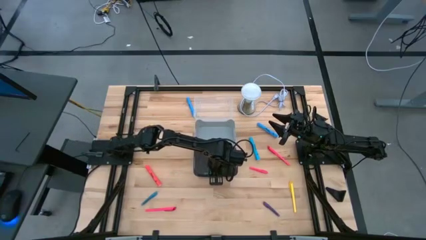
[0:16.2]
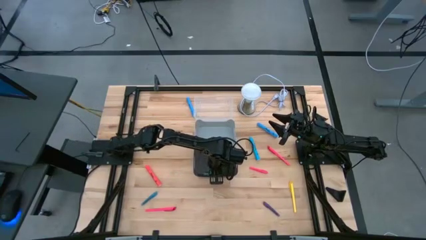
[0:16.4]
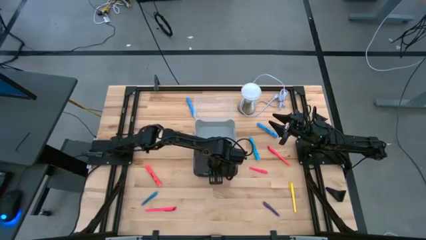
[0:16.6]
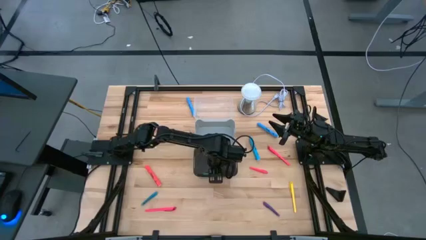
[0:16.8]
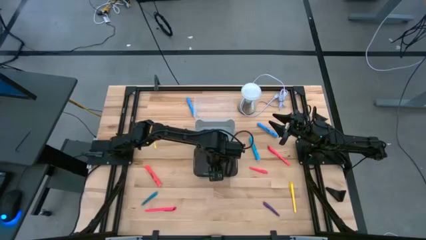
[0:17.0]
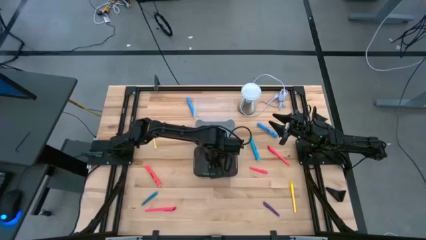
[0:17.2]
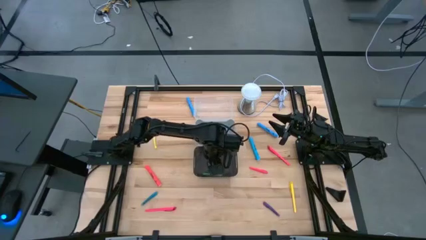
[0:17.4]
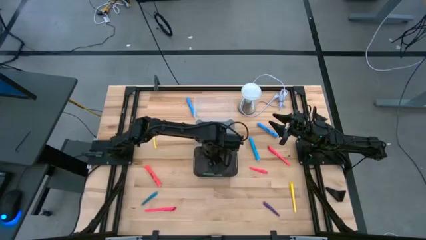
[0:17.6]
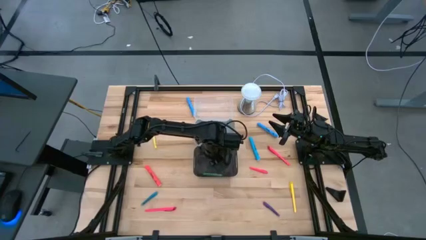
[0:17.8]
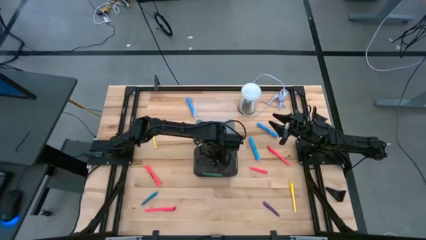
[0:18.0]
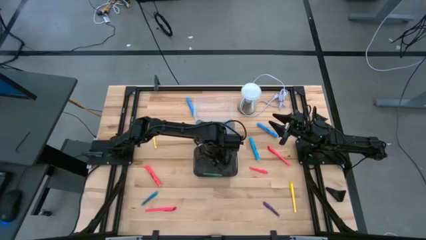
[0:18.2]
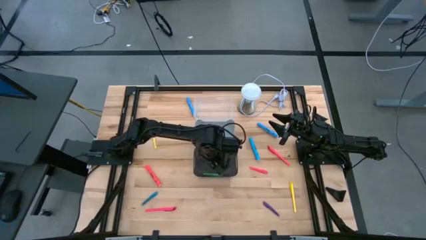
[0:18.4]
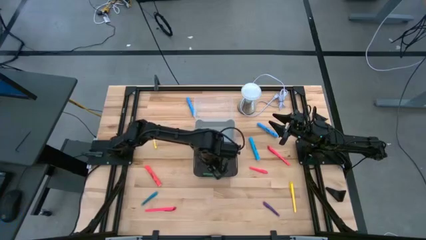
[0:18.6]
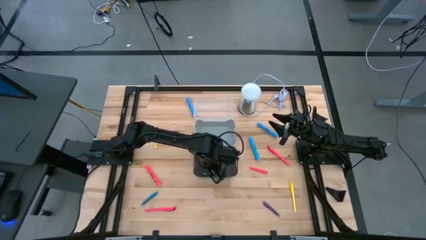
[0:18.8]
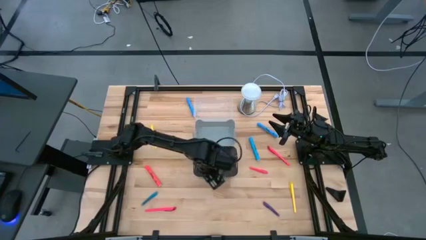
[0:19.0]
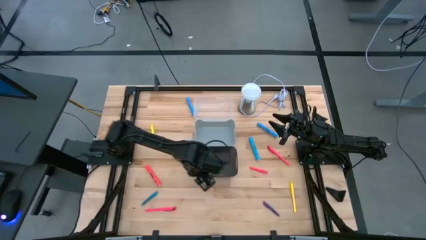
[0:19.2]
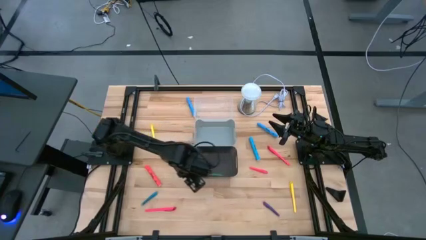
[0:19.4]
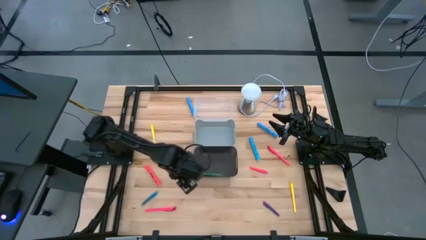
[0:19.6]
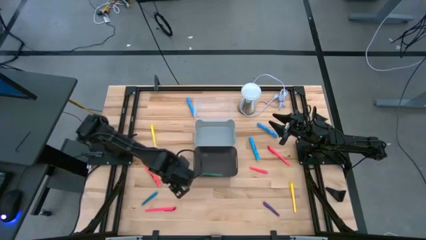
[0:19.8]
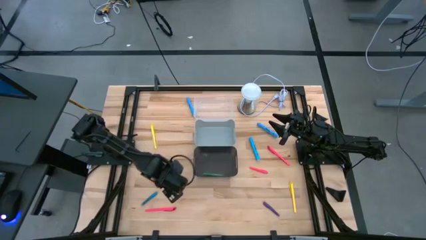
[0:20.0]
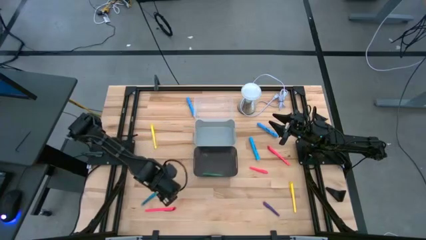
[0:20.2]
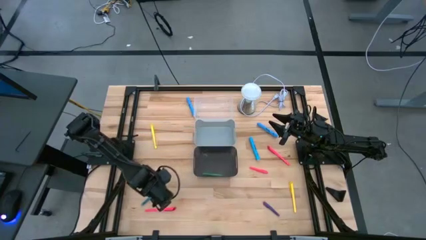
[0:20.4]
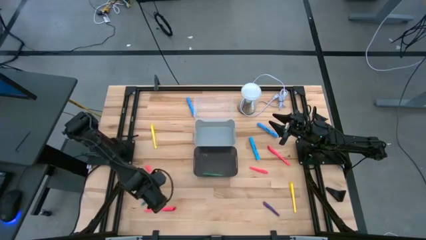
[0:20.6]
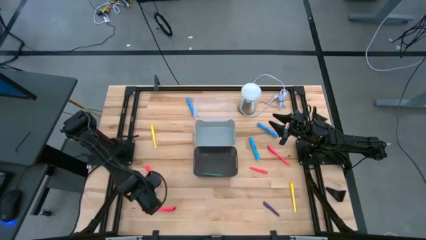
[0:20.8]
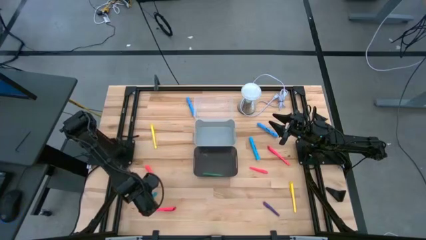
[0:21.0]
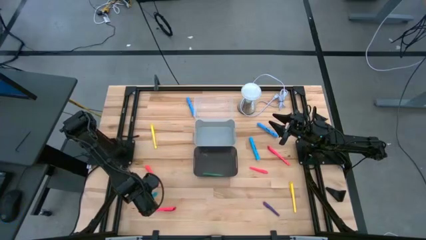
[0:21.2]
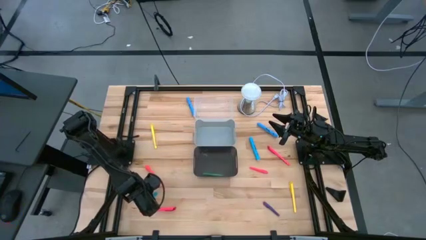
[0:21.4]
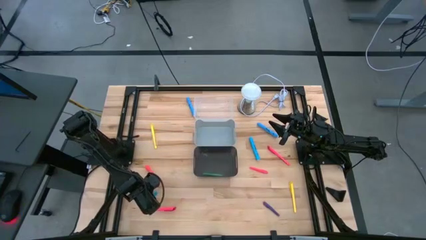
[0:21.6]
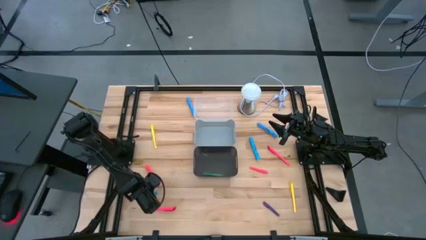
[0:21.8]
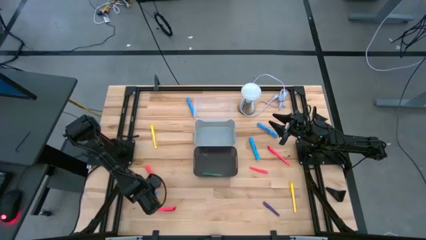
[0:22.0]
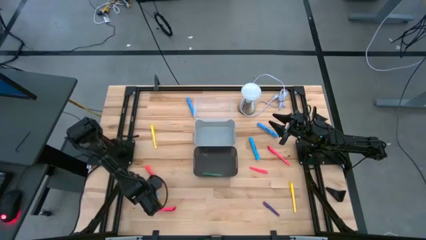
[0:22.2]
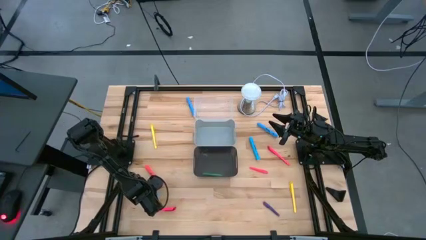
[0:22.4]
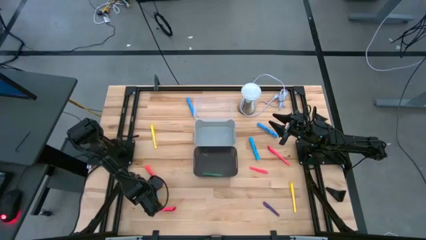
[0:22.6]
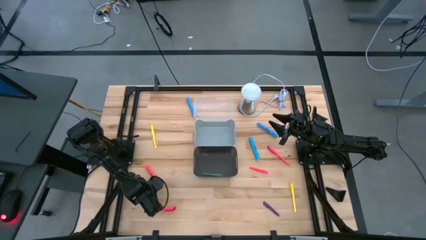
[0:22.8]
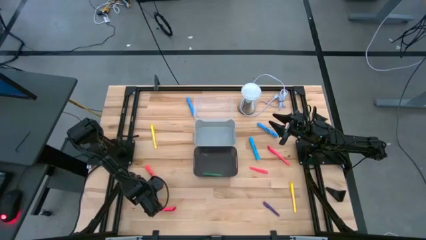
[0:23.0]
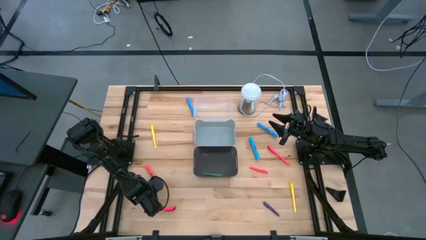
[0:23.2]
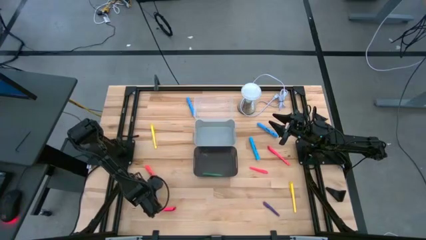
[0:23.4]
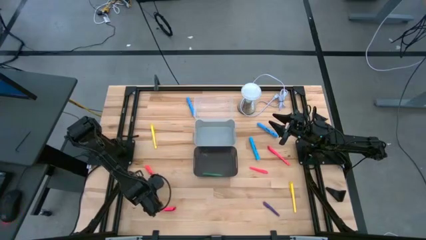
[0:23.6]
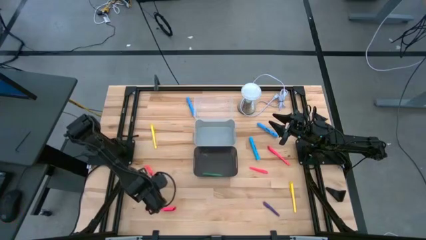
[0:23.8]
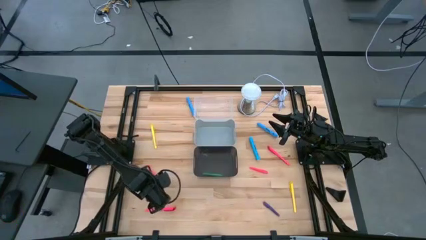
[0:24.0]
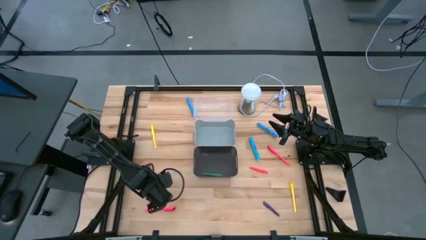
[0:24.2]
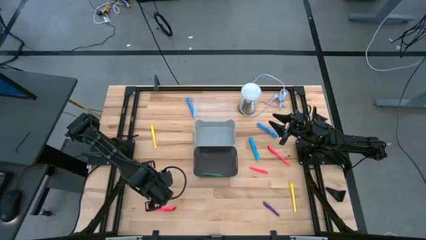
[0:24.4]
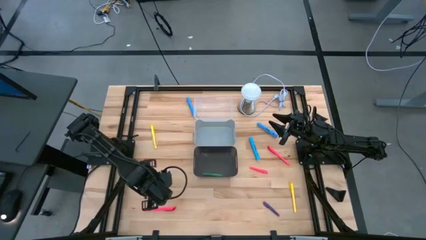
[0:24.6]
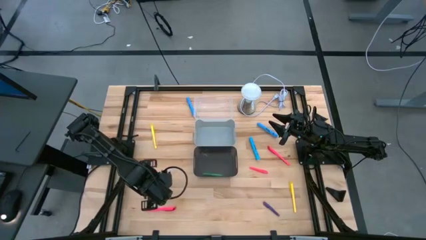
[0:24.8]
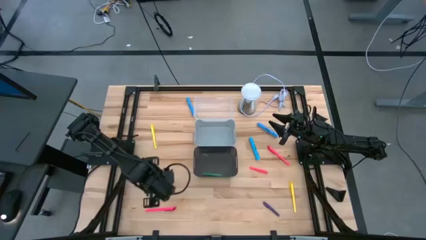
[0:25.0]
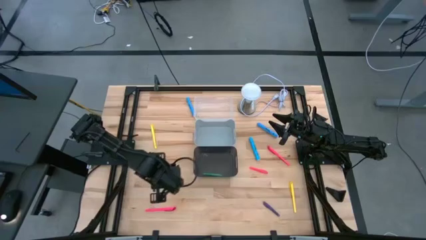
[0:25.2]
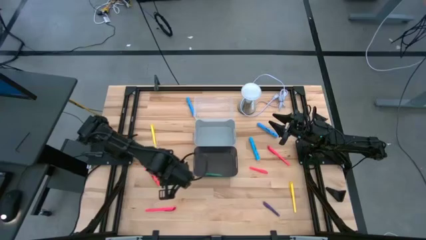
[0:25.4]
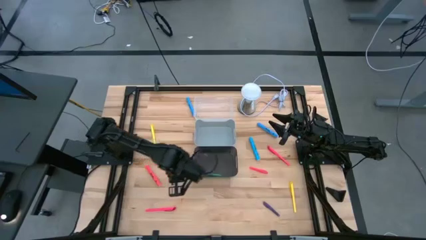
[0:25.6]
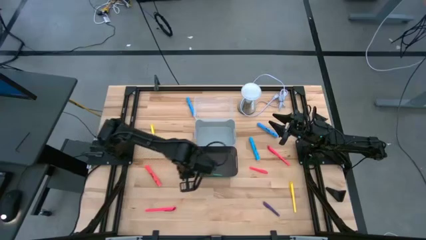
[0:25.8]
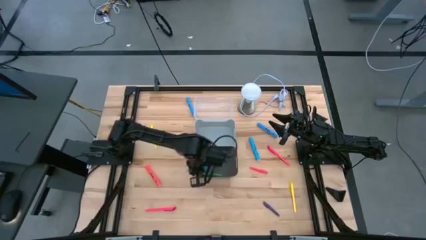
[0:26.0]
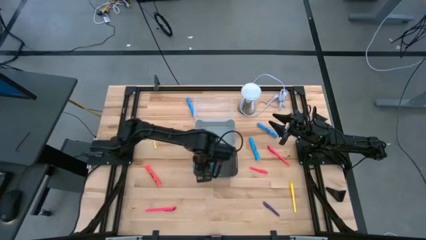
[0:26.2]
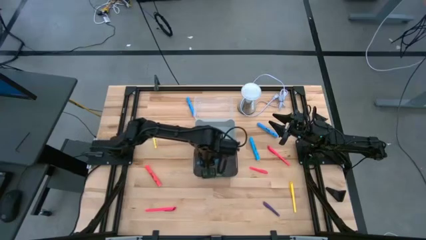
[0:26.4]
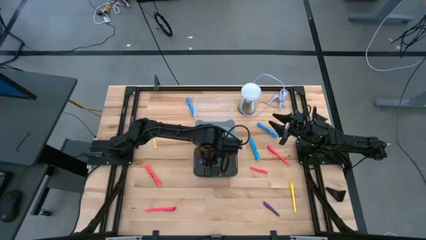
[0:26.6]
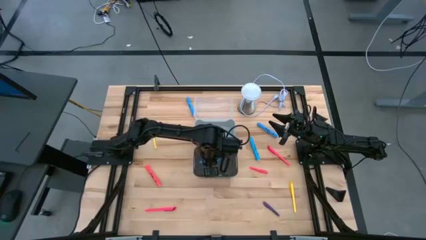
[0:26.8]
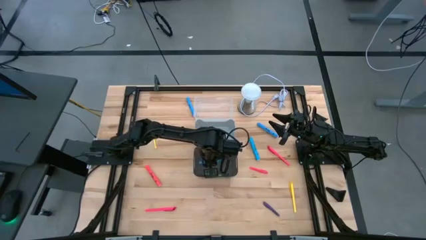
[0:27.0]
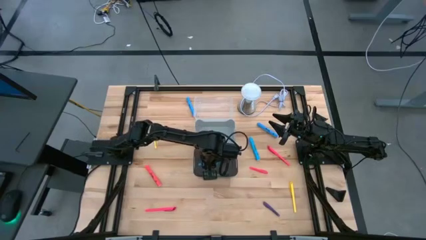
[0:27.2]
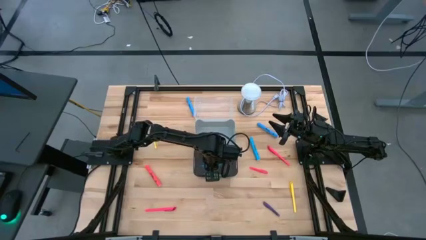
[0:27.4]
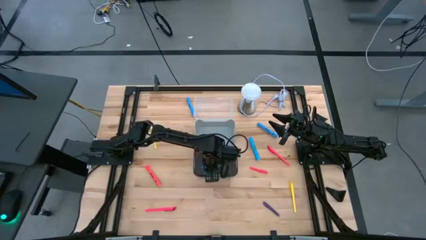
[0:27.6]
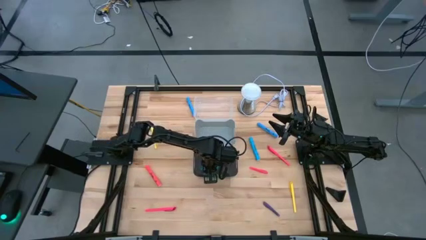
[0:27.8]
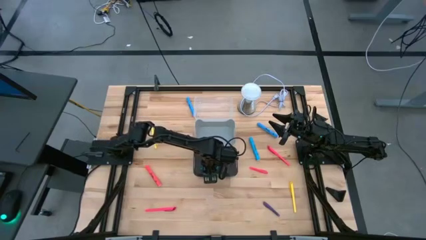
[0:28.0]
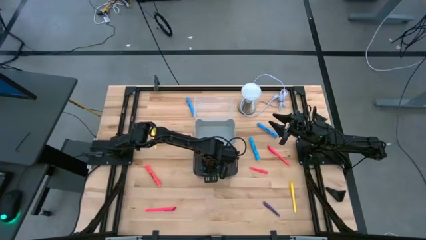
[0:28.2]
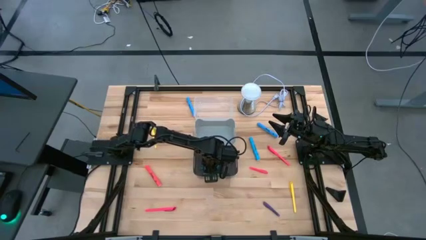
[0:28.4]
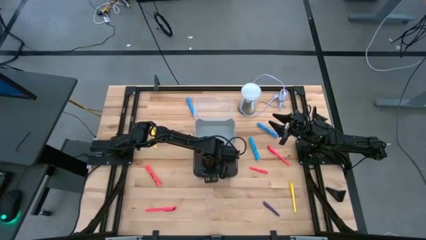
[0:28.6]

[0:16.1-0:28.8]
Task: Pick & Place Markers
Put the blue pen into the black bin

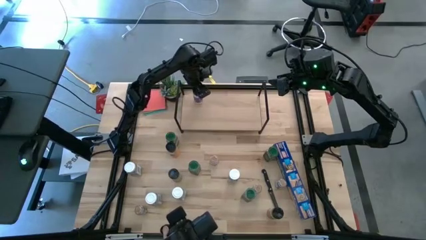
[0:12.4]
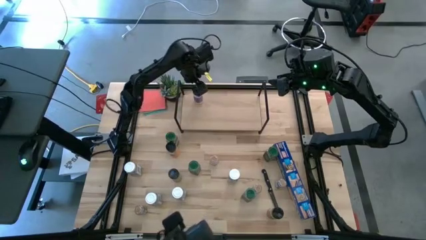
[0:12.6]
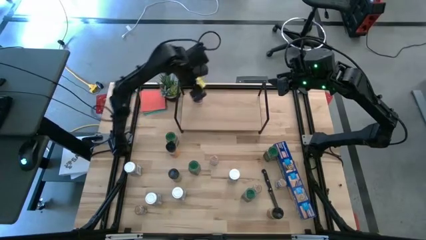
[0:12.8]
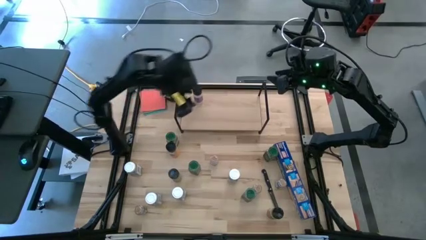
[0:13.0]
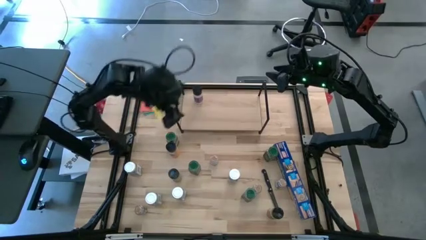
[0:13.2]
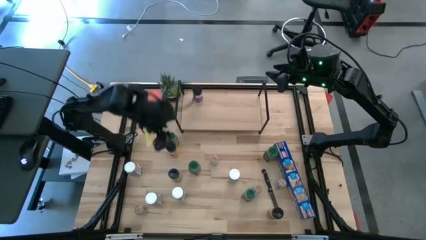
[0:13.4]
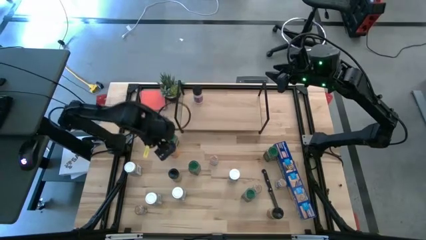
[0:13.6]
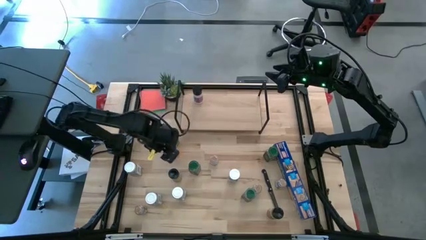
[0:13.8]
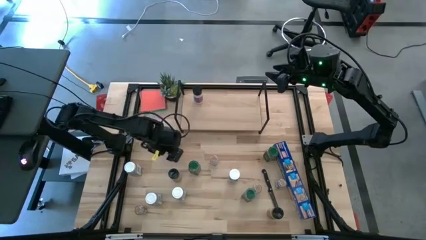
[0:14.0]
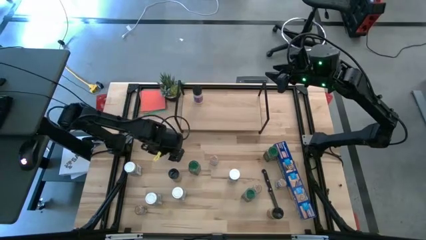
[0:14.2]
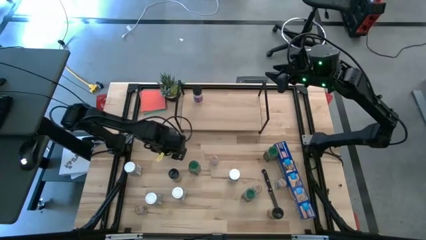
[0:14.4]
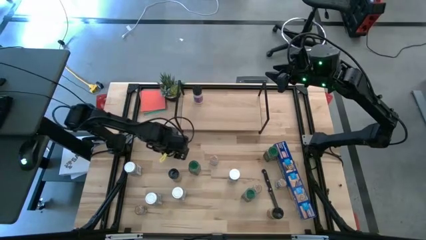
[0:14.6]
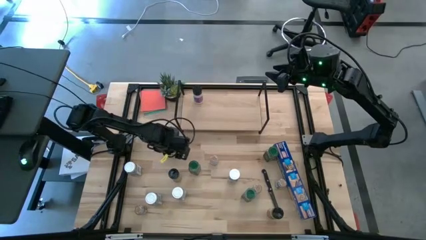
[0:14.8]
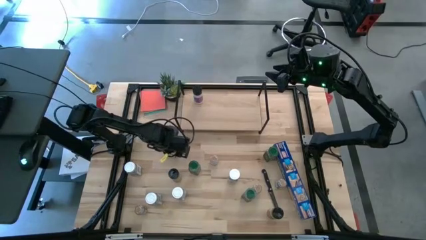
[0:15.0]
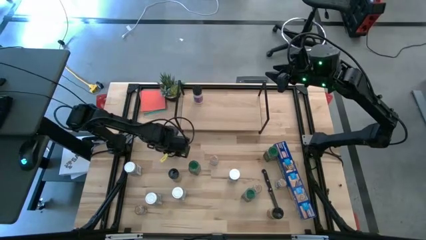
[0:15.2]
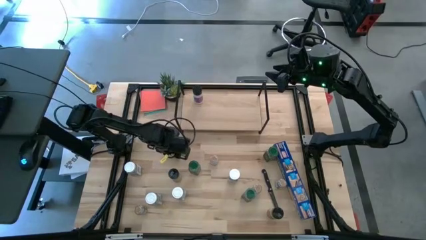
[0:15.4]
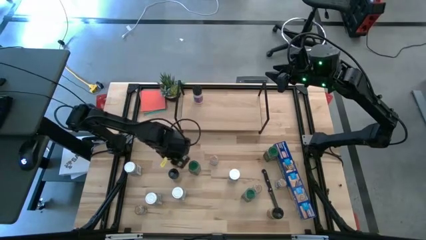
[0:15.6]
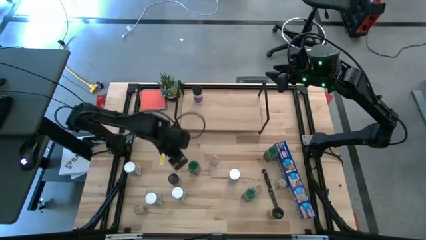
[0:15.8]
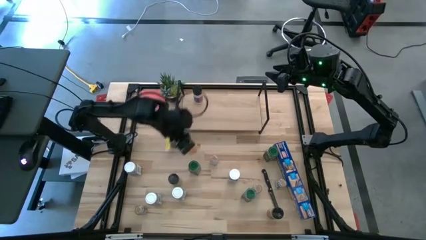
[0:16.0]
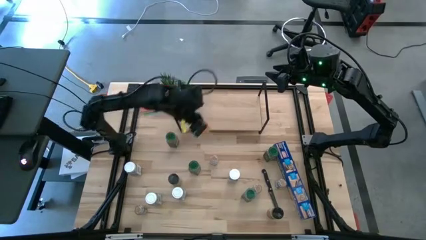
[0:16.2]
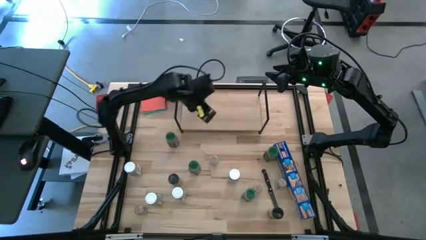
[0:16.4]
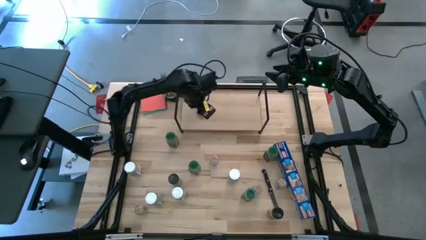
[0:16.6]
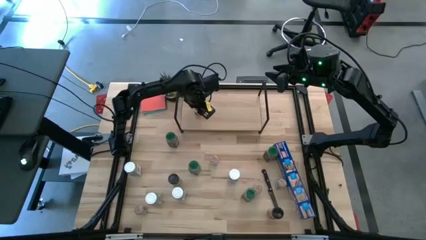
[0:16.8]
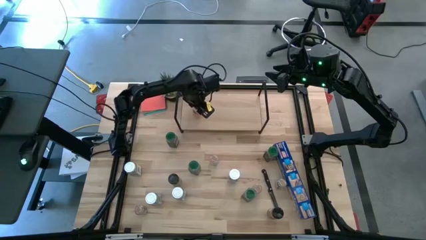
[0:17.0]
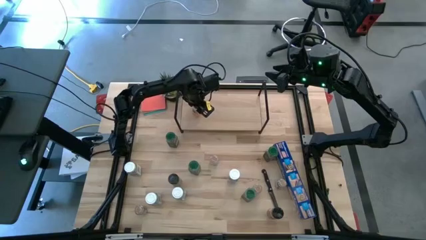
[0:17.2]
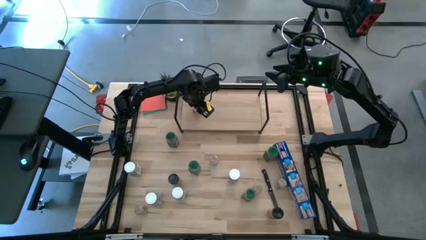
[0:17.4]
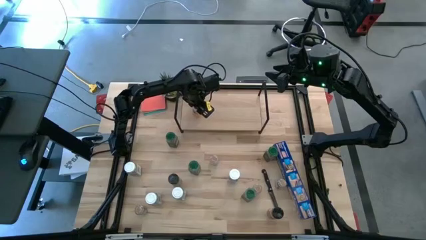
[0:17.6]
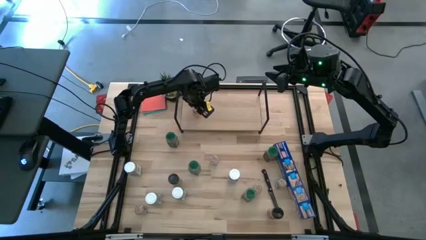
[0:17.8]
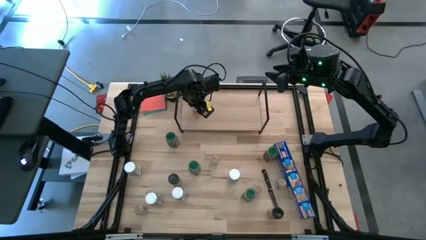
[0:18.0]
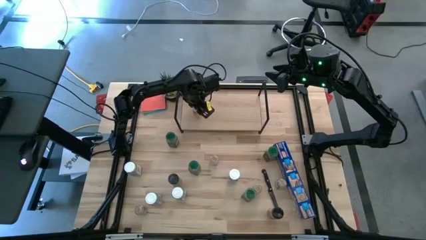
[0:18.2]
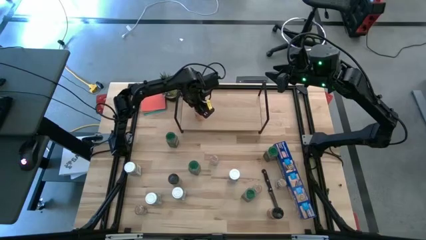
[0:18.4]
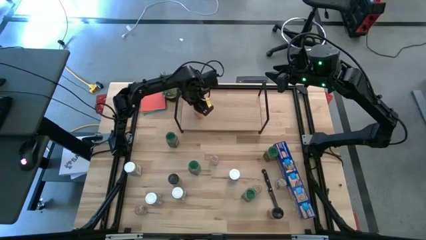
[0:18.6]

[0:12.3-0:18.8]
Task: Shelf spices
Put the black seasoning bottle on the shelf
